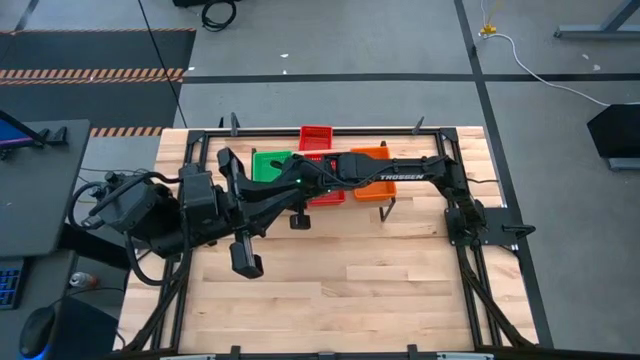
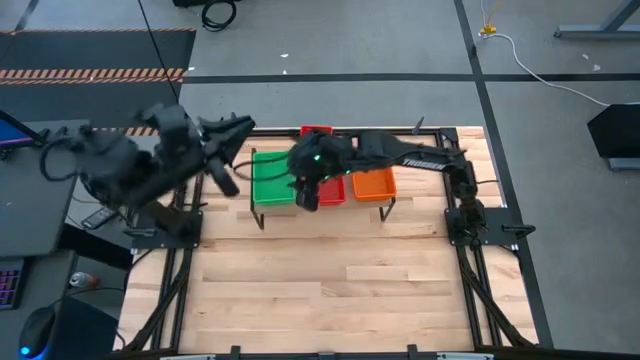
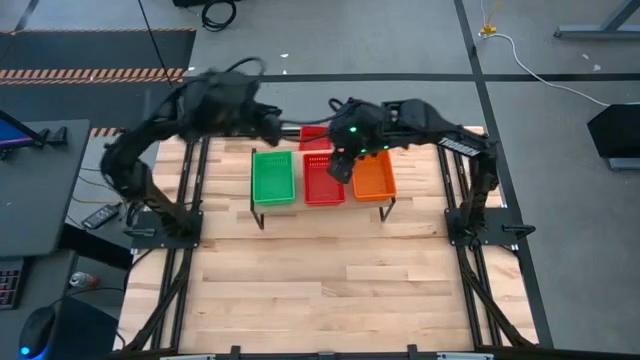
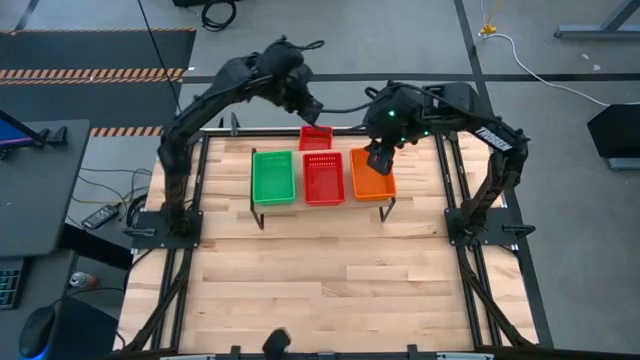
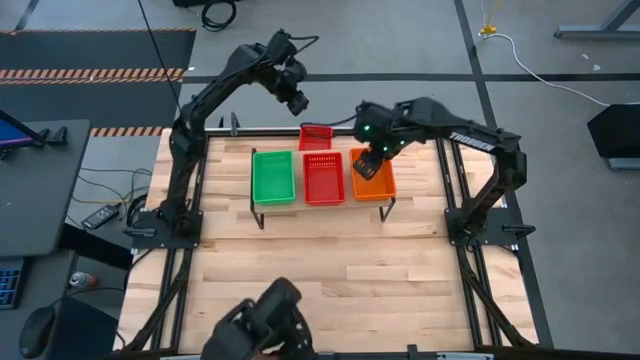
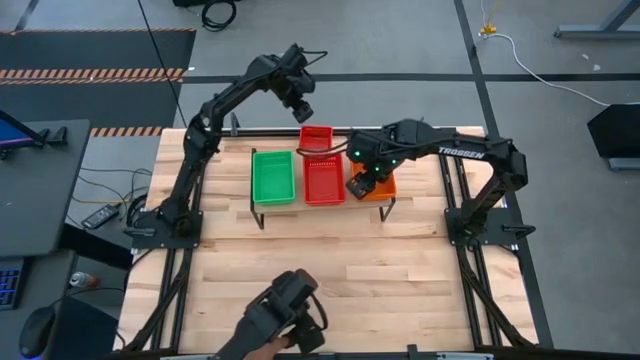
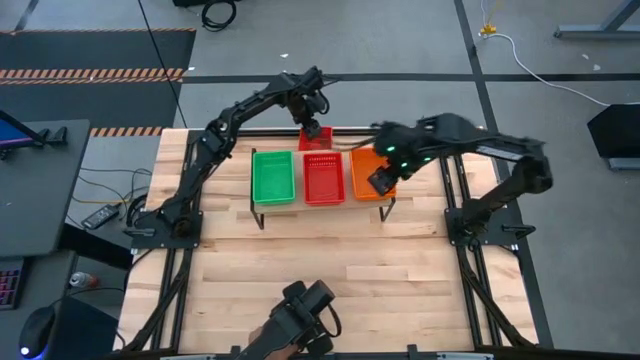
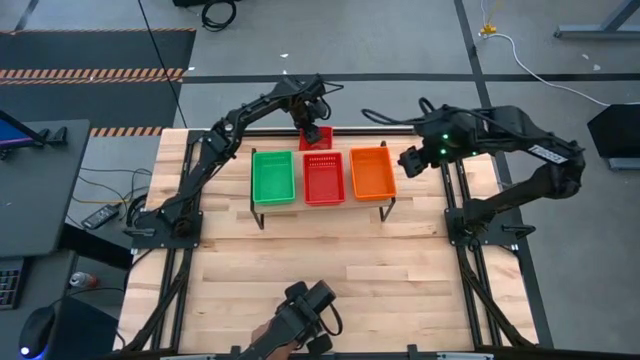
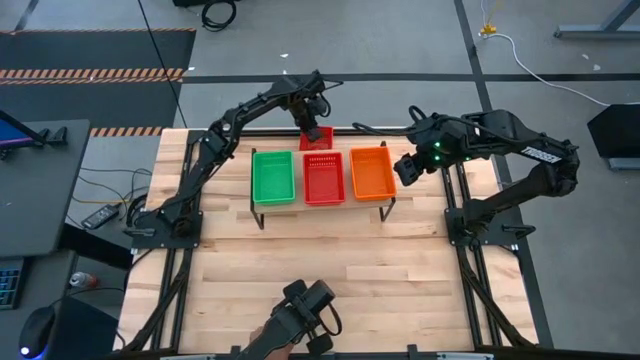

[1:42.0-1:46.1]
Task: Stack baskets on shelf by color
Stack the red bin on top of the other stacked red bins on the shelf

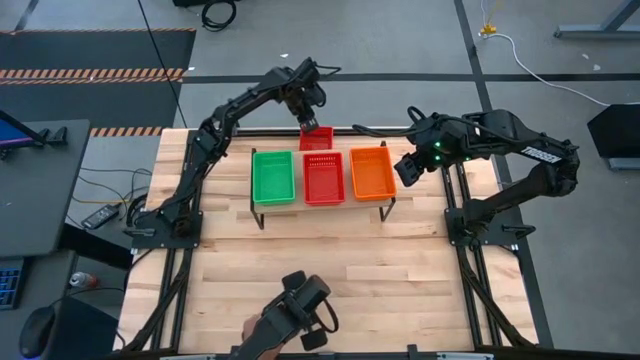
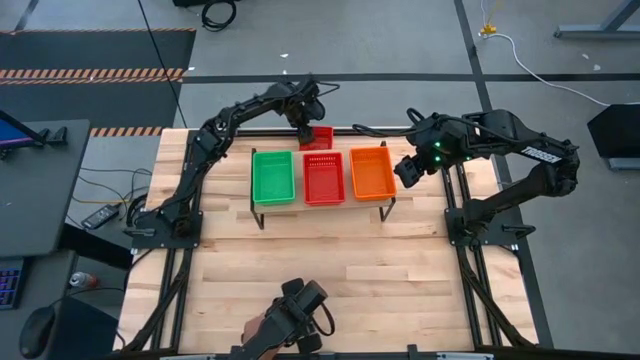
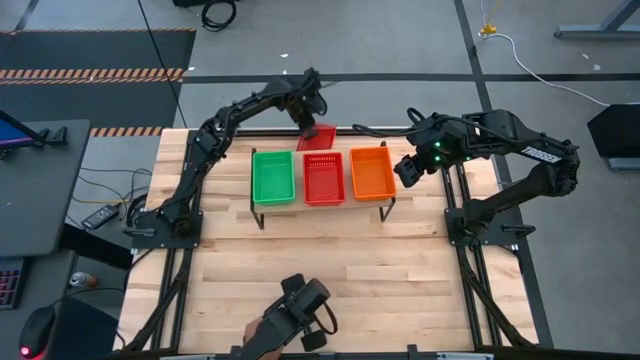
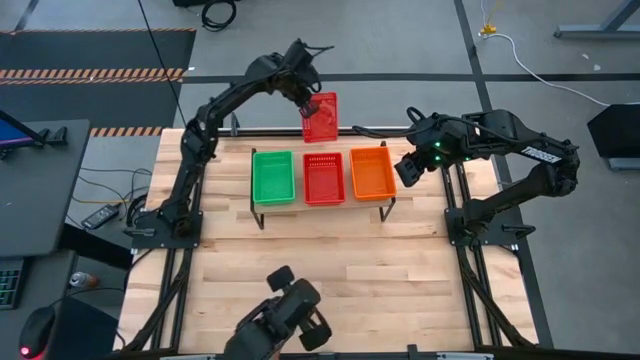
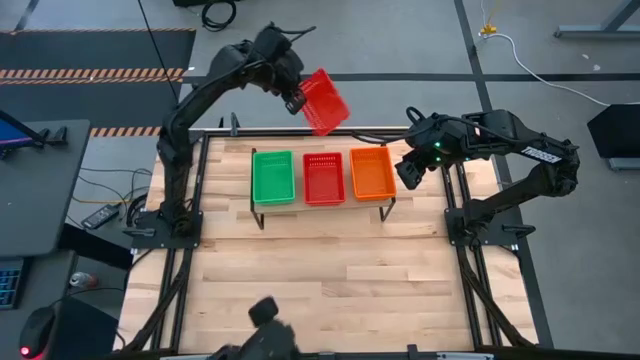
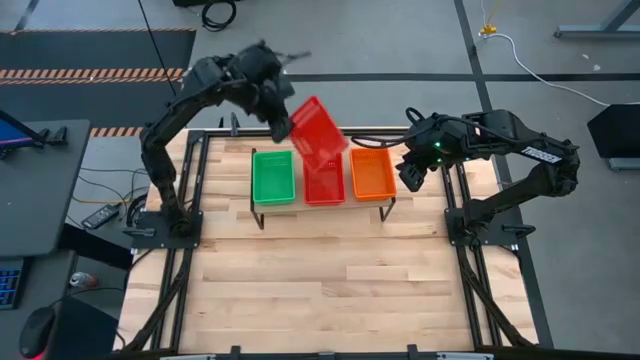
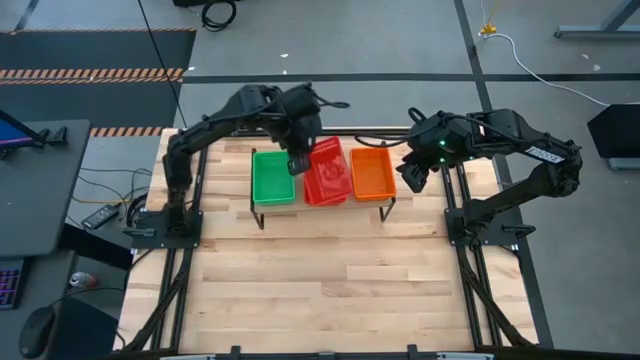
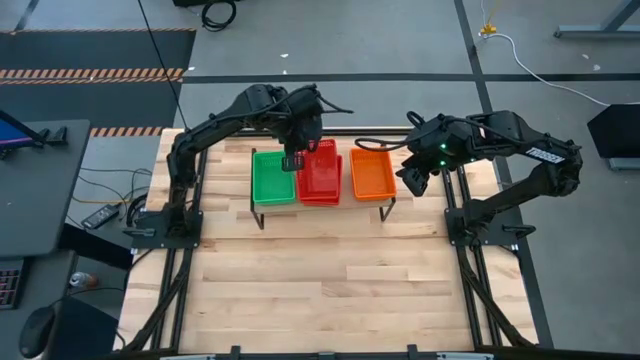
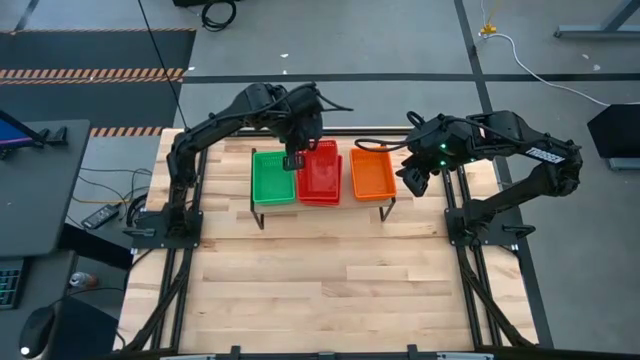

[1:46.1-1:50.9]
Stack the red bin on top of the other stacked red bins on the shelf

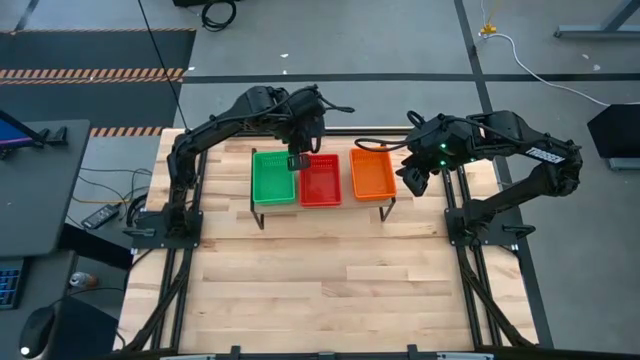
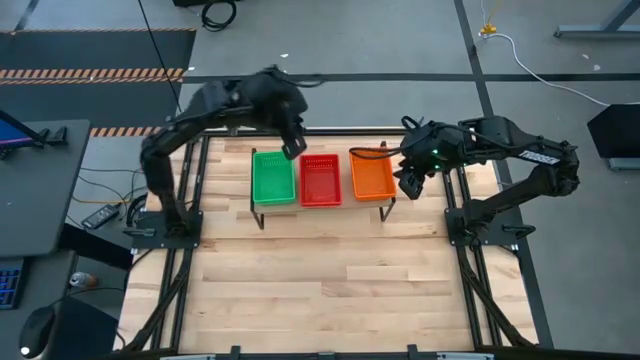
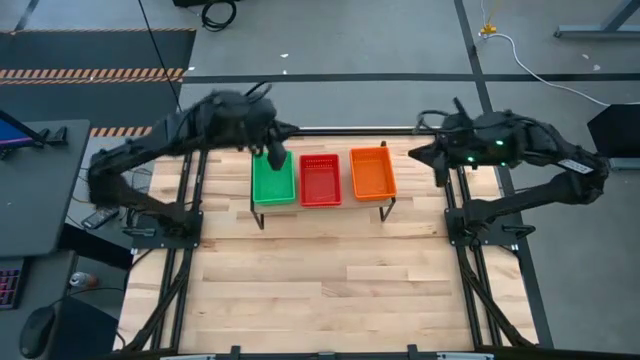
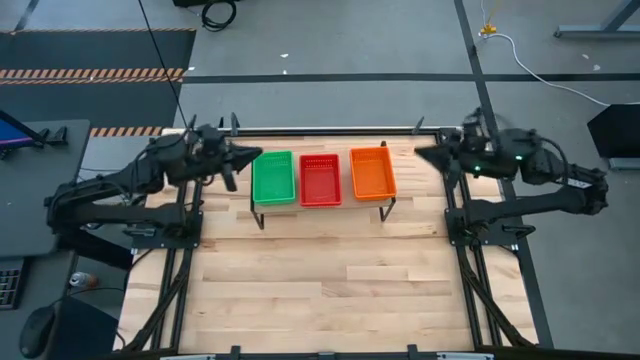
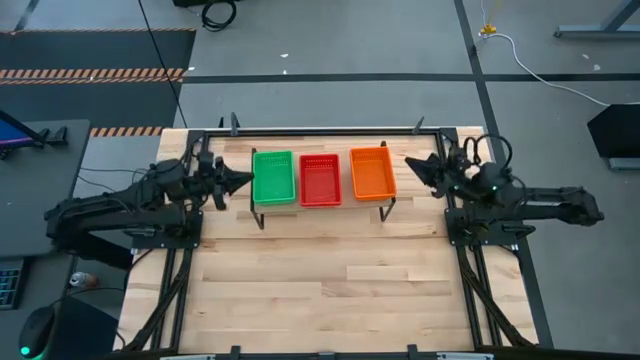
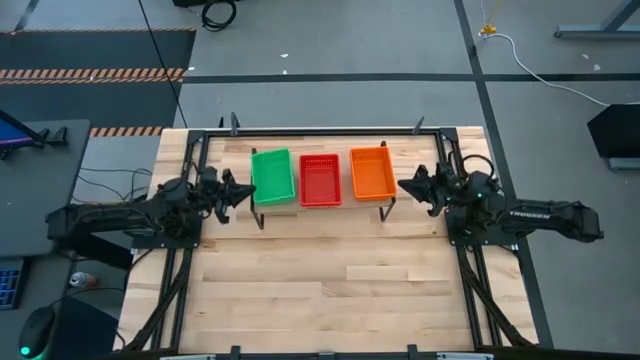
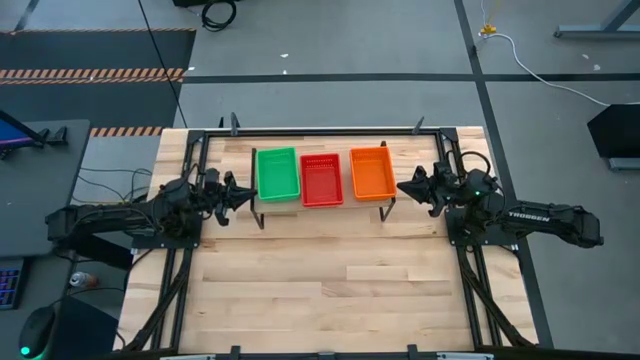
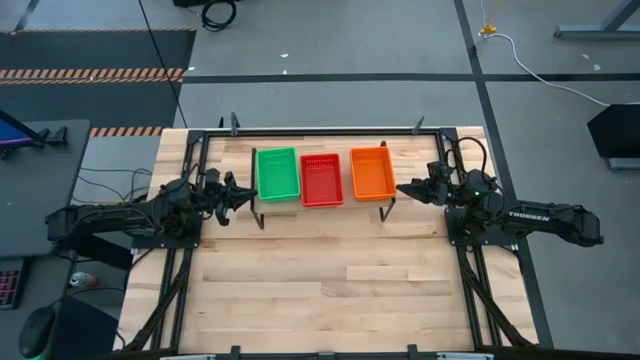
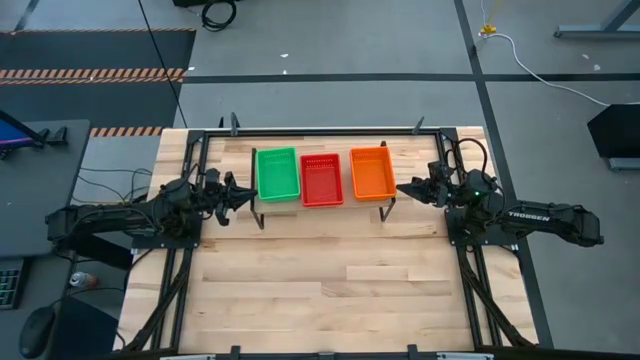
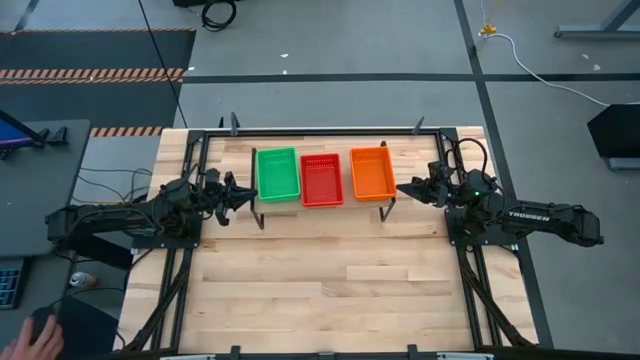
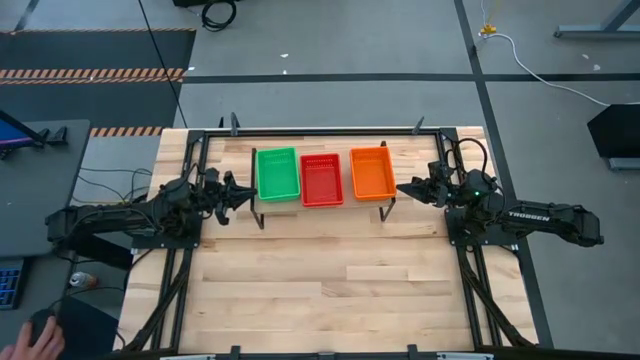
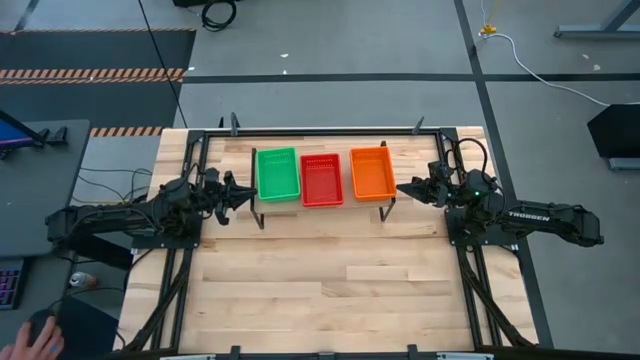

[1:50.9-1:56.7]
Return to Home Position

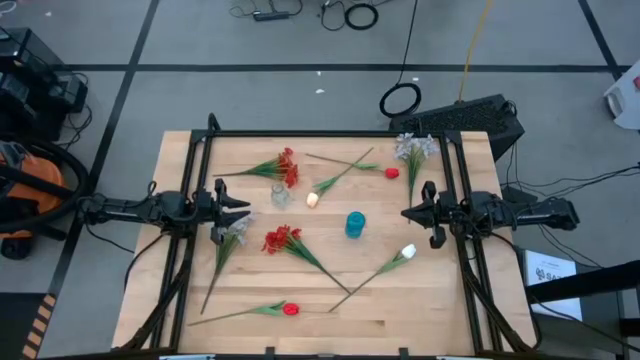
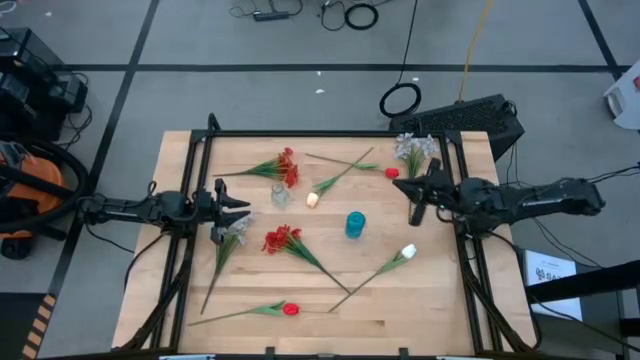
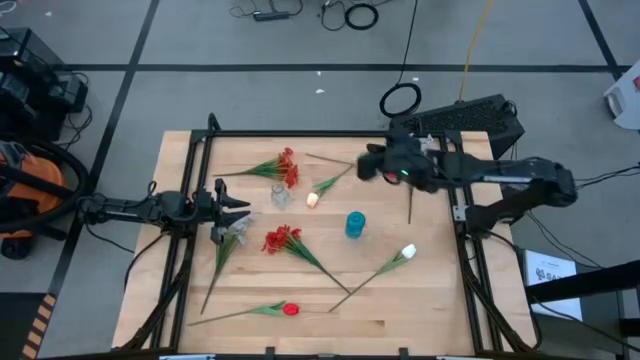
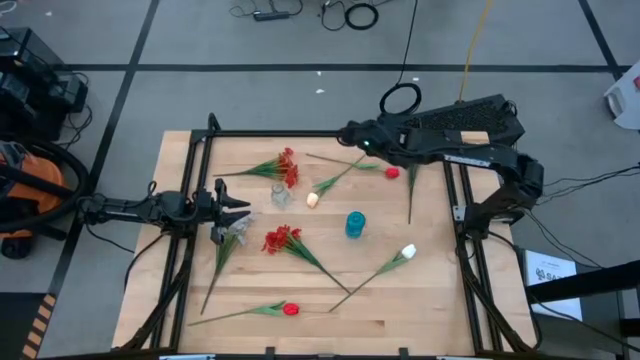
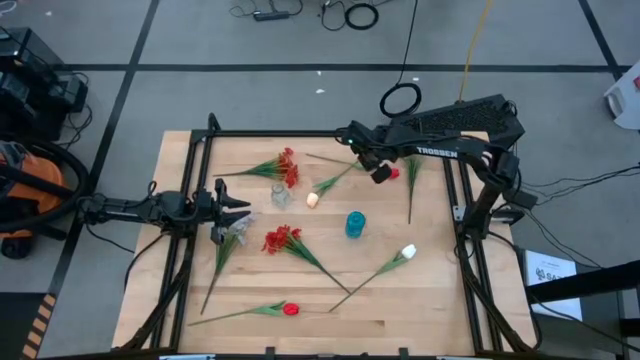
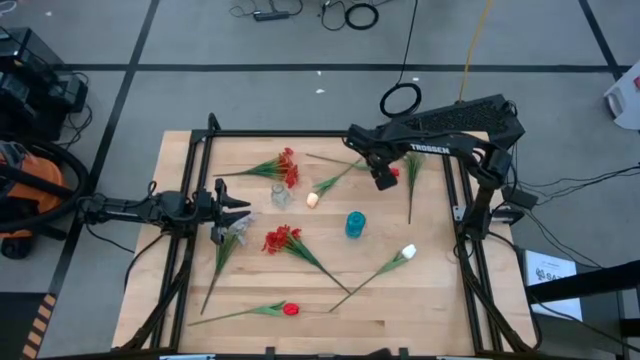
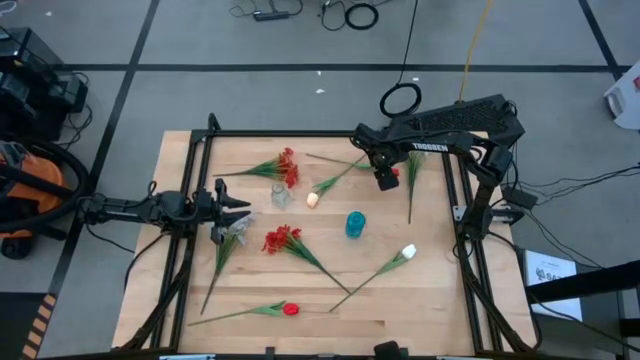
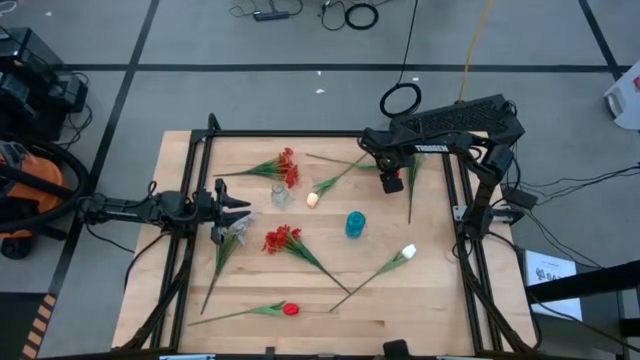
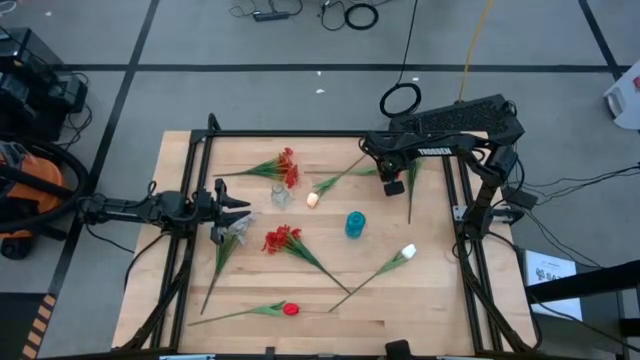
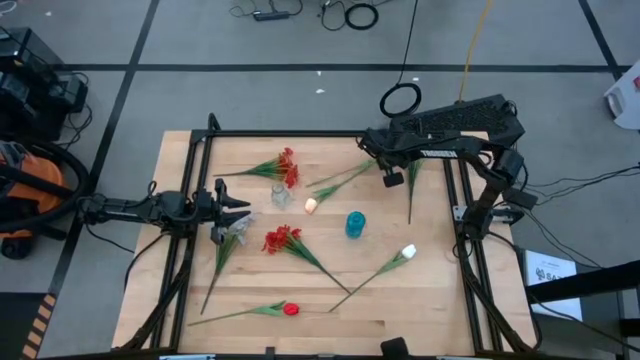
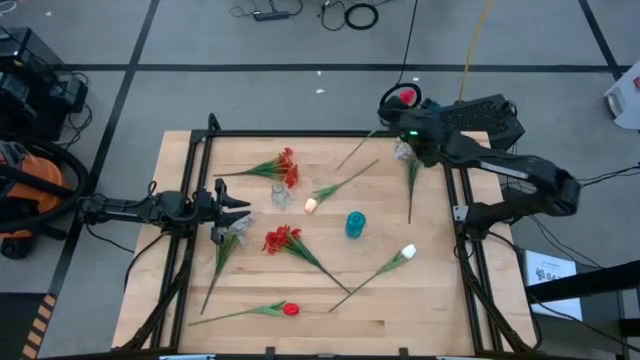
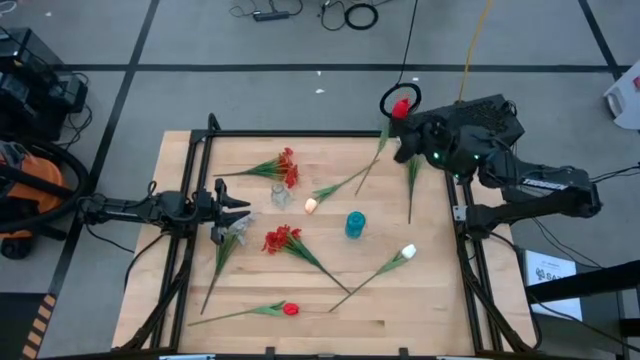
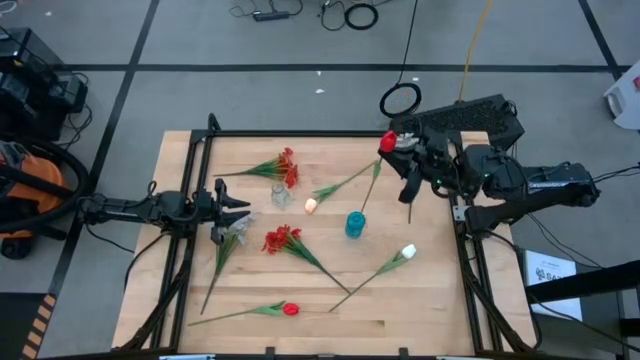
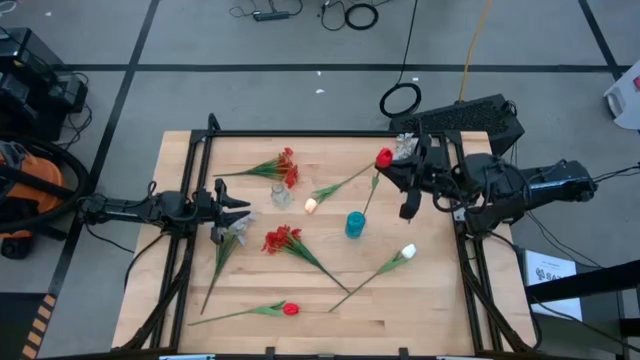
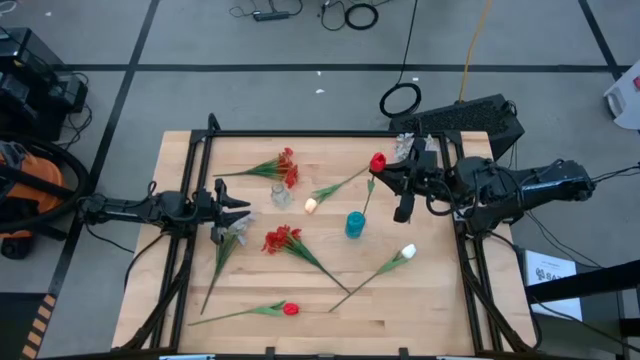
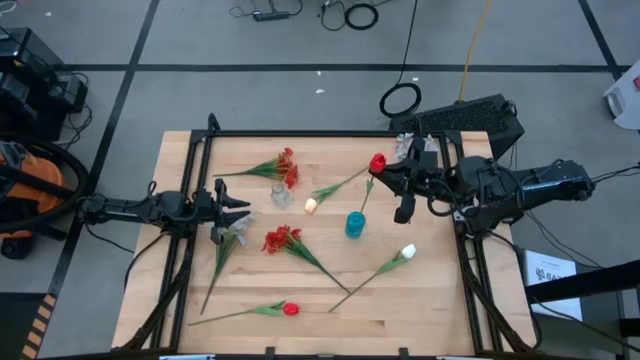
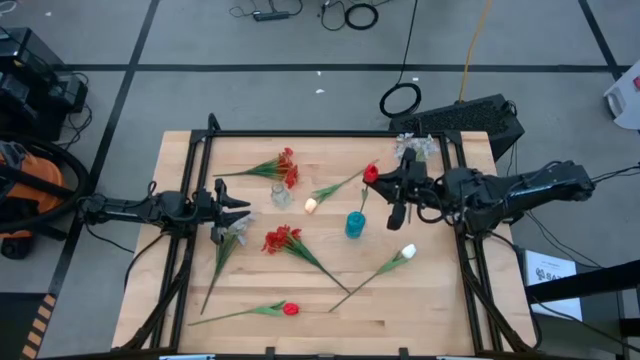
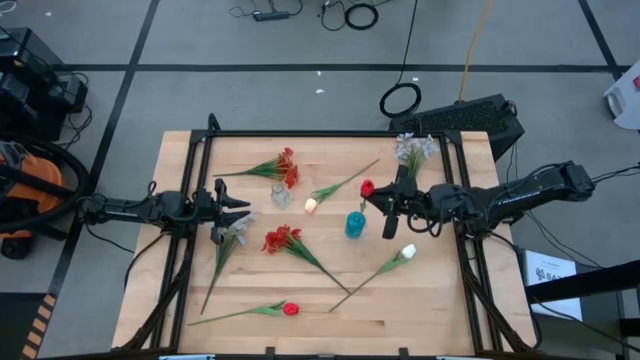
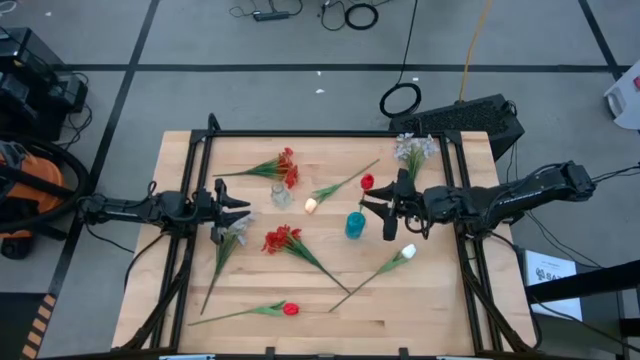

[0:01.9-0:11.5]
Task: Sort flowers into vase by color
Put the top red tulip into the blue vase
